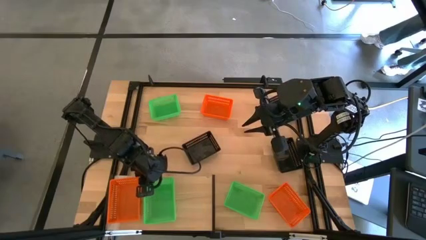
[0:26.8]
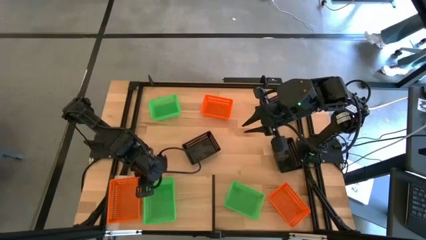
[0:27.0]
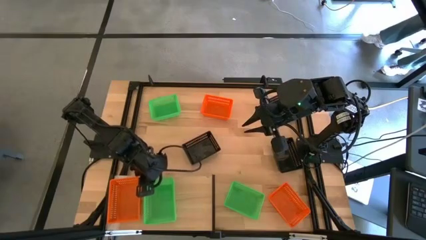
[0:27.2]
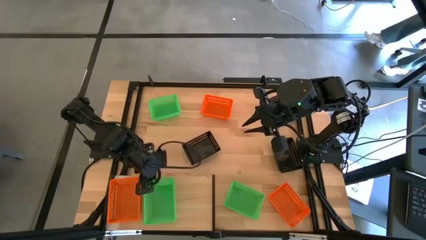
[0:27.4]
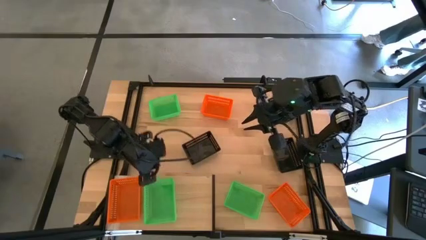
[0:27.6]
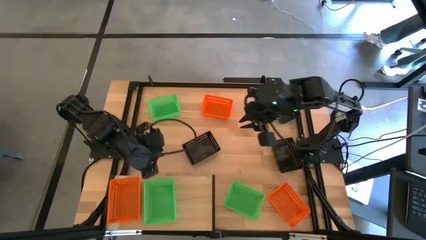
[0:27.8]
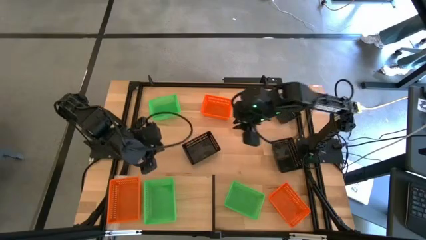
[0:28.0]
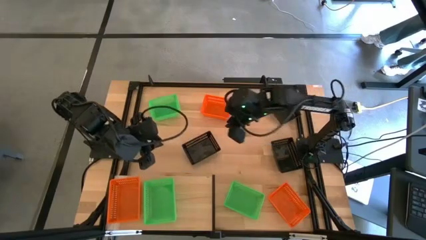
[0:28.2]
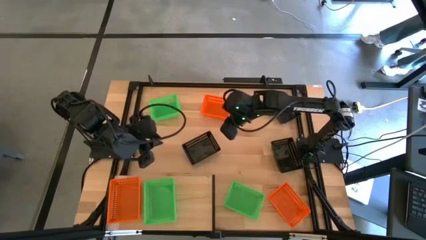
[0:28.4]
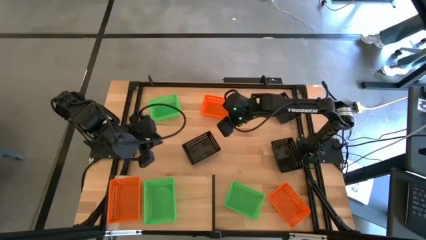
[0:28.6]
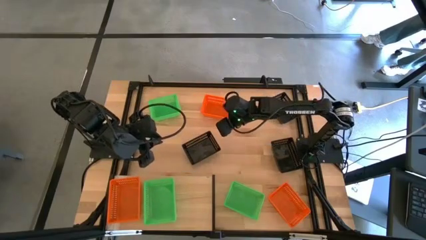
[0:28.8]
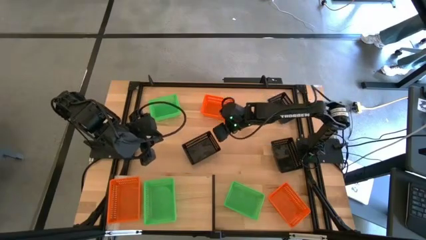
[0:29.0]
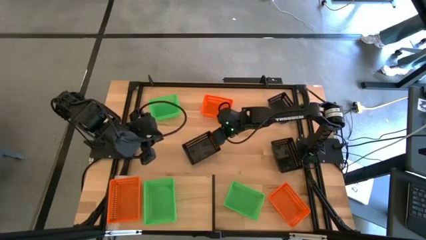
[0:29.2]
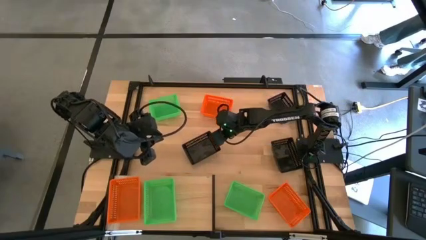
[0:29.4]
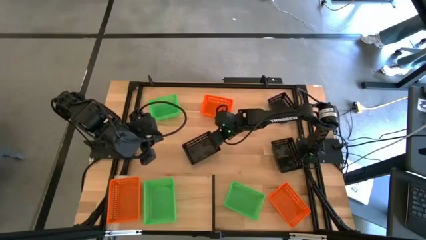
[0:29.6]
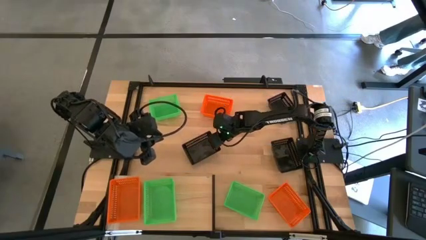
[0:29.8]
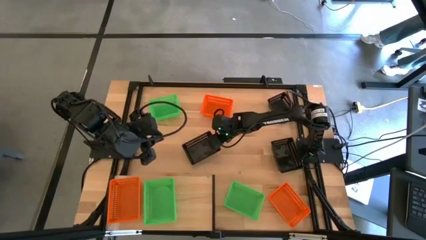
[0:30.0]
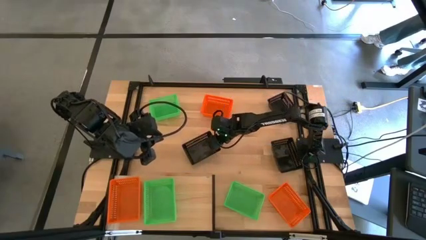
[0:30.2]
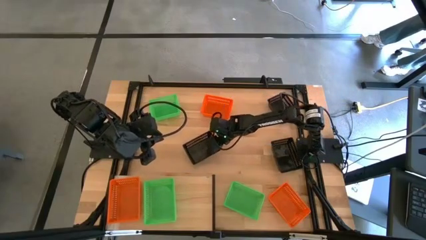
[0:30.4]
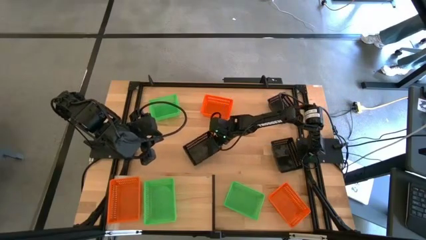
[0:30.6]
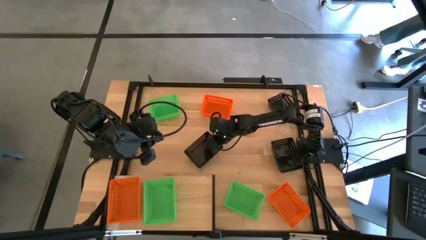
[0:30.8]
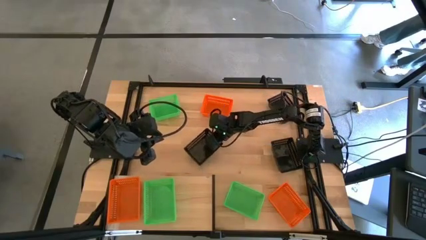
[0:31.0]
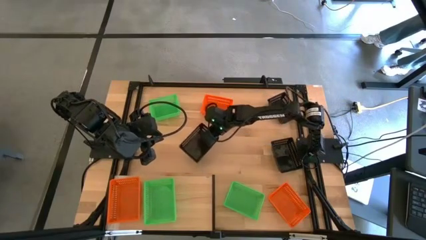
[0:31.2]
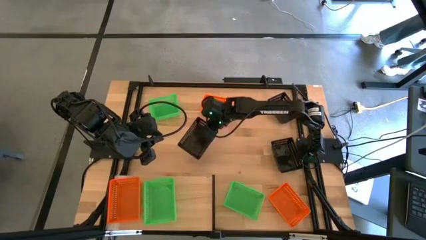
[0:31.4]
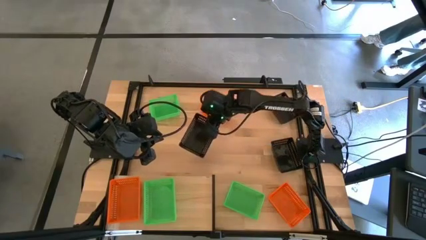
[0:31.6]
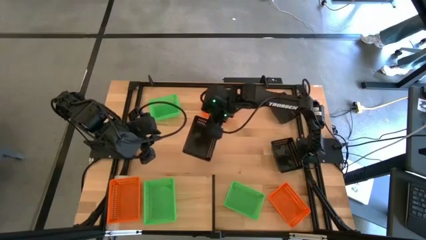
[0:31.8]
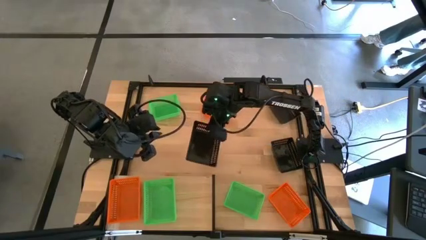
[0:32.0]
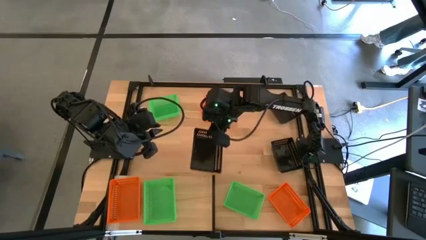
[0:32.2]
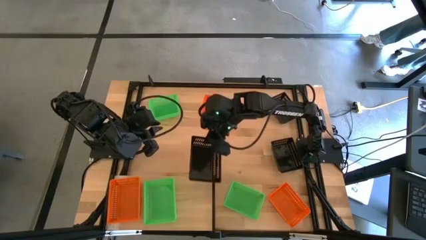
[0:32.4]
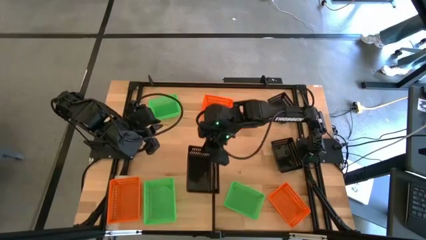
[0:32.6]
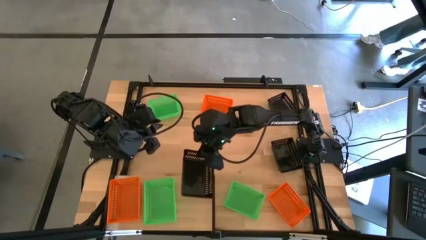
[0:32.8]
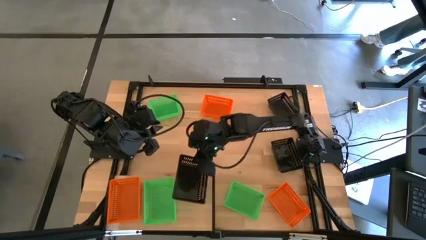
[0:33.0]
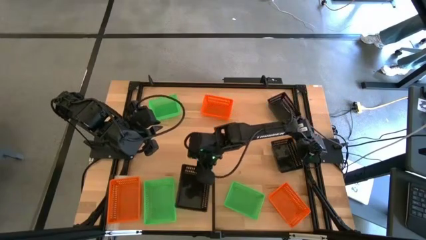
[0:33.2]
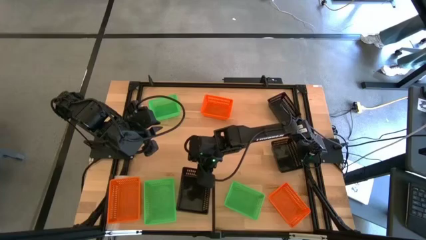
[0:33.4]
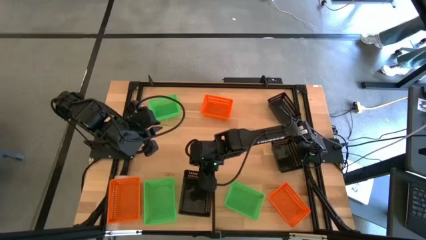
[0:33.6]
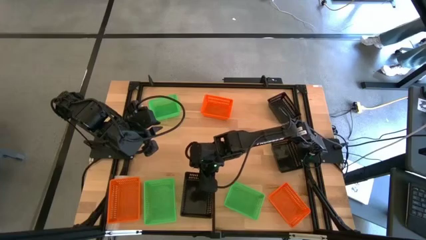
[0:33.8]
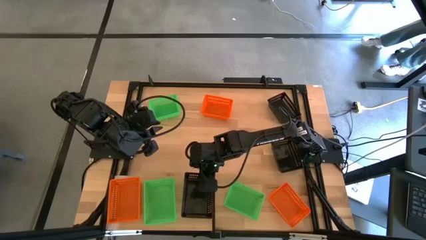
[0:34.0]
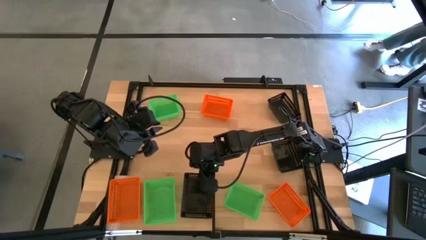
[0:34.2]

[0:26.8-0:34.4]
Task: Stack baskets on shelf by color
Put the left black basket on the shelf

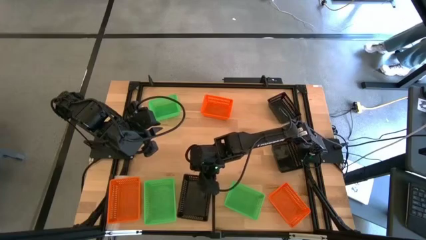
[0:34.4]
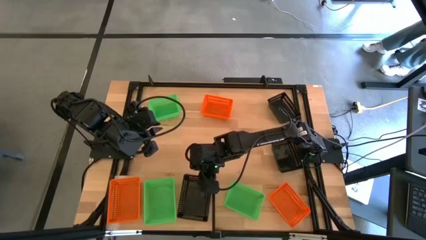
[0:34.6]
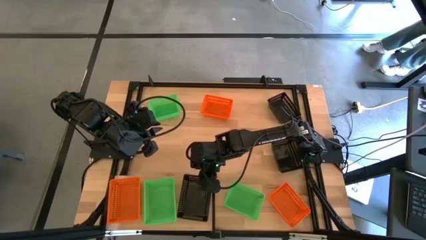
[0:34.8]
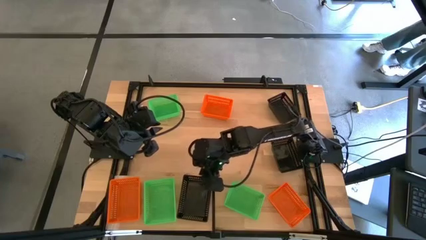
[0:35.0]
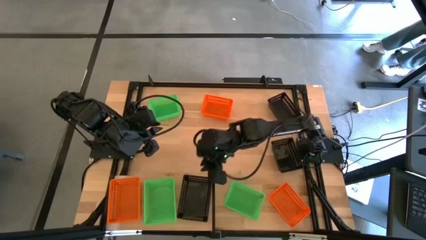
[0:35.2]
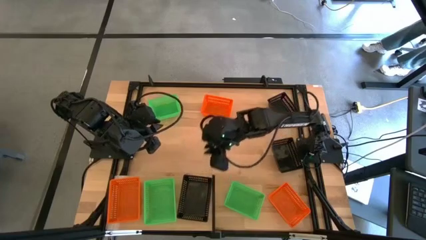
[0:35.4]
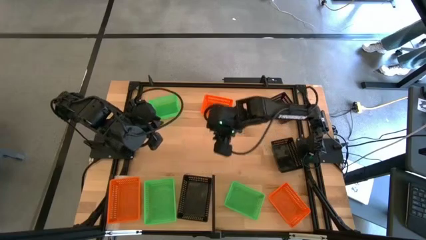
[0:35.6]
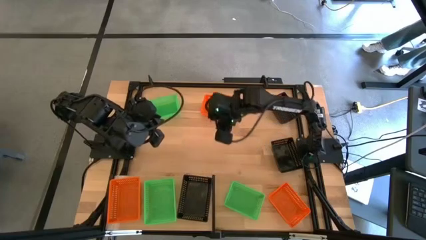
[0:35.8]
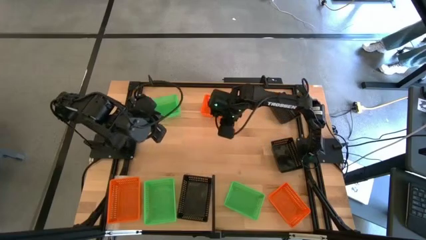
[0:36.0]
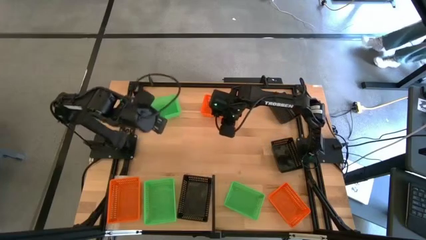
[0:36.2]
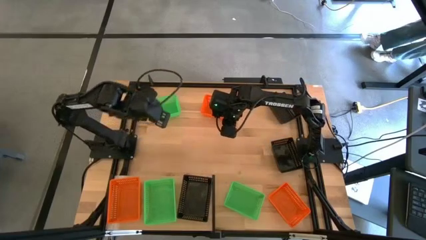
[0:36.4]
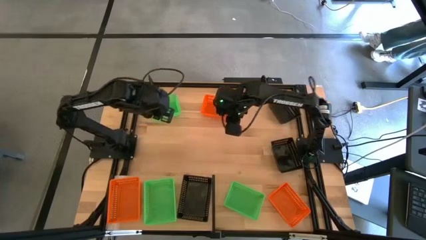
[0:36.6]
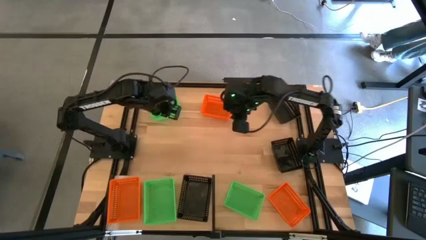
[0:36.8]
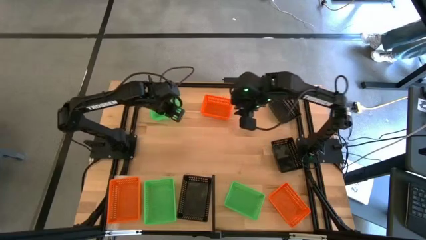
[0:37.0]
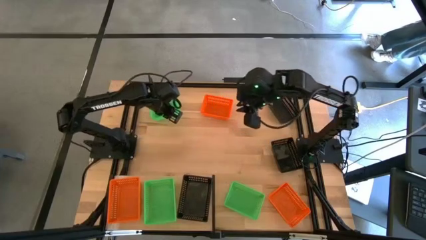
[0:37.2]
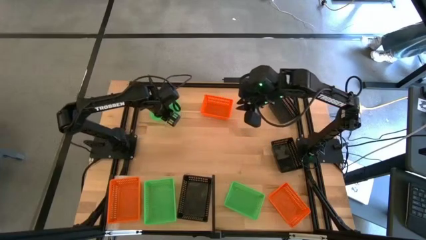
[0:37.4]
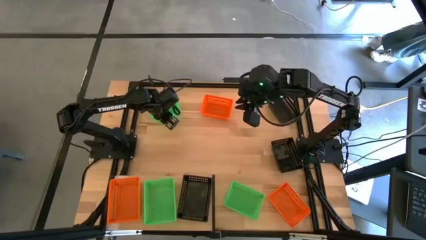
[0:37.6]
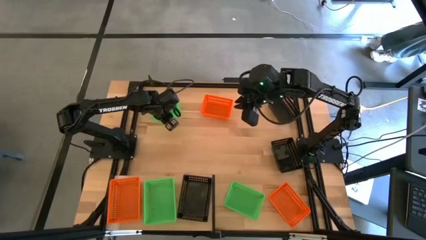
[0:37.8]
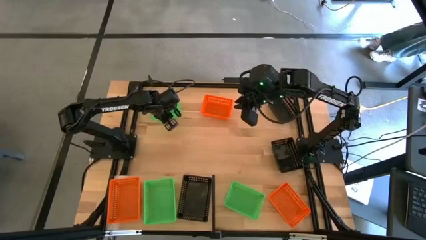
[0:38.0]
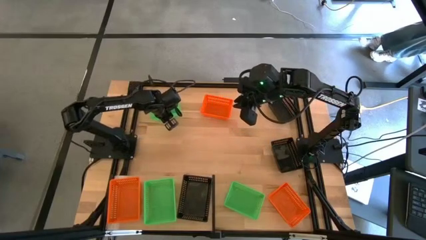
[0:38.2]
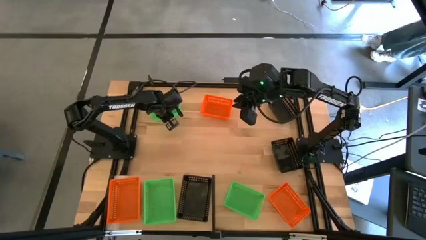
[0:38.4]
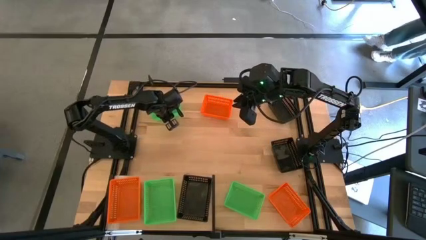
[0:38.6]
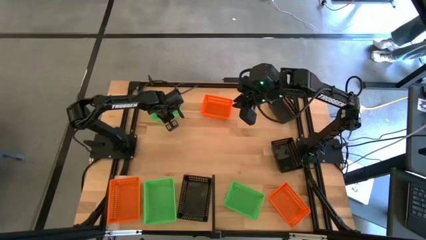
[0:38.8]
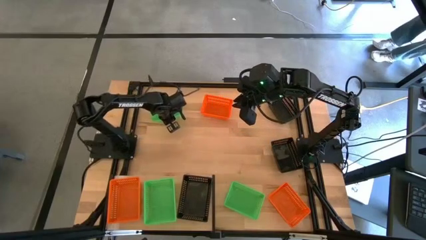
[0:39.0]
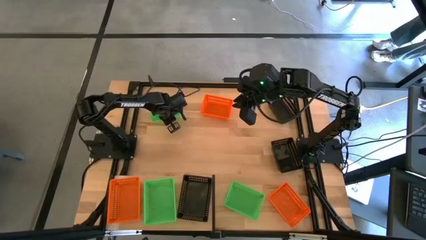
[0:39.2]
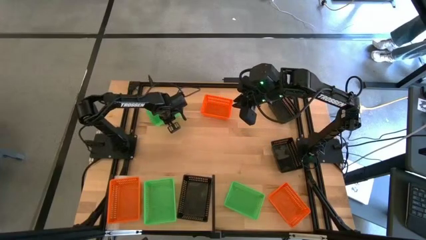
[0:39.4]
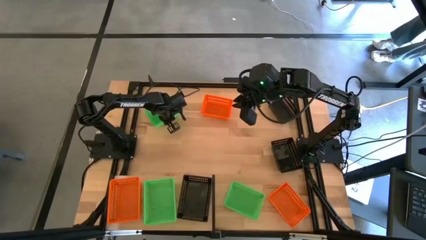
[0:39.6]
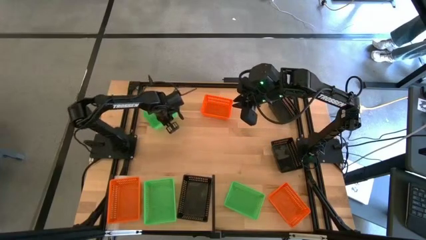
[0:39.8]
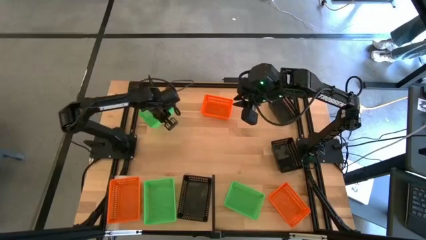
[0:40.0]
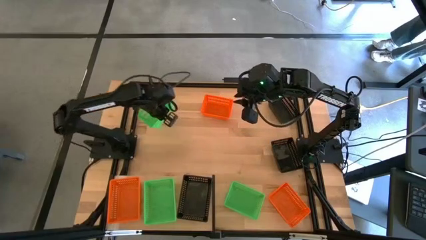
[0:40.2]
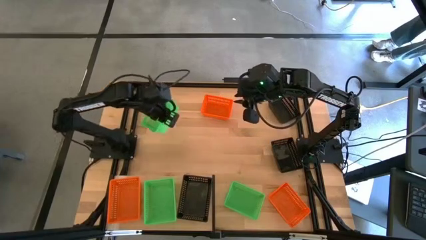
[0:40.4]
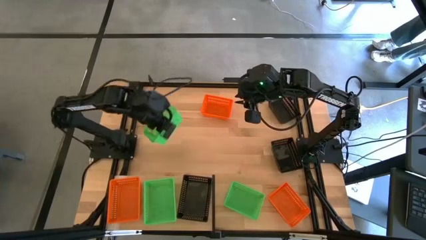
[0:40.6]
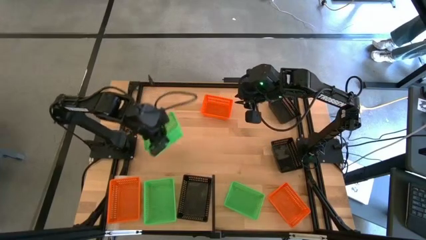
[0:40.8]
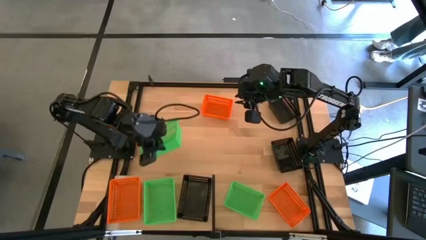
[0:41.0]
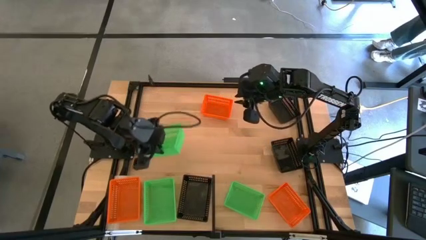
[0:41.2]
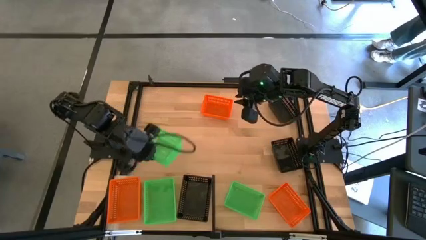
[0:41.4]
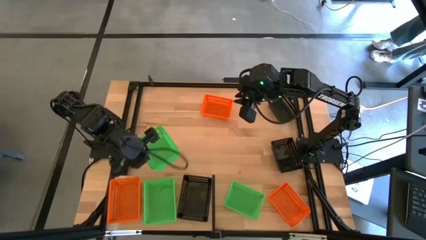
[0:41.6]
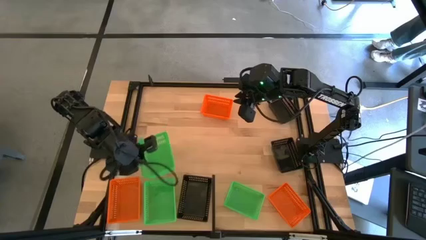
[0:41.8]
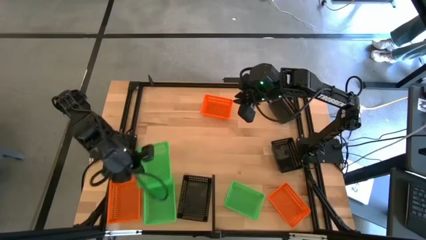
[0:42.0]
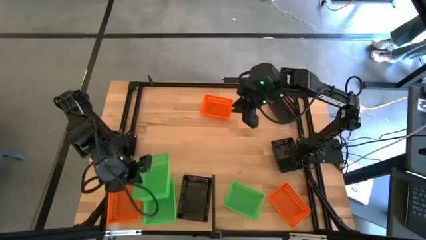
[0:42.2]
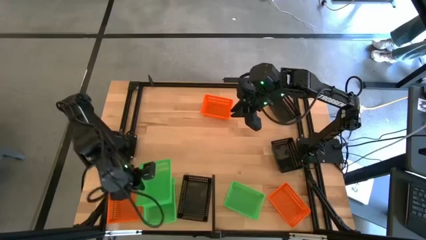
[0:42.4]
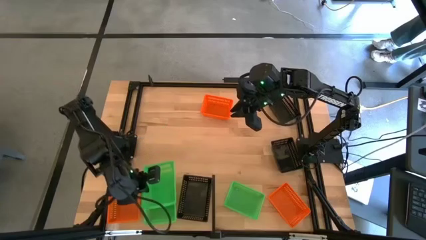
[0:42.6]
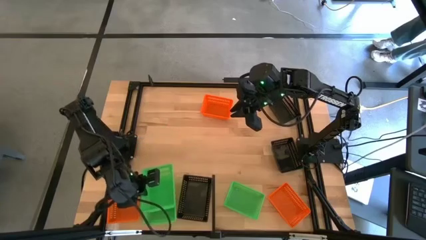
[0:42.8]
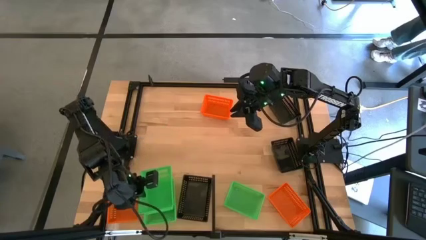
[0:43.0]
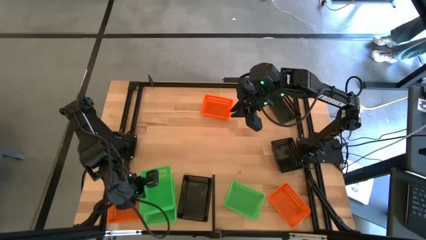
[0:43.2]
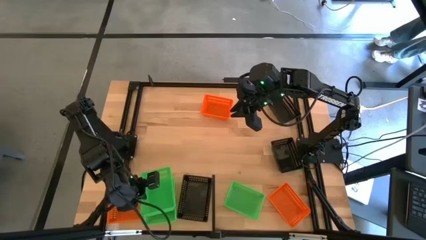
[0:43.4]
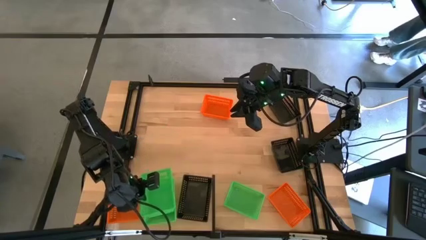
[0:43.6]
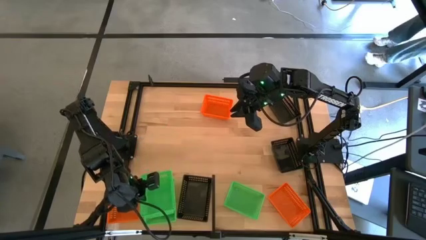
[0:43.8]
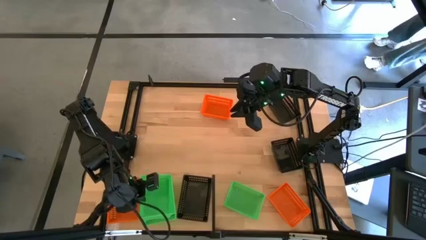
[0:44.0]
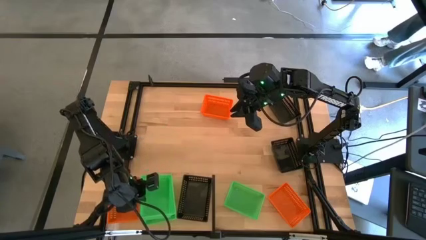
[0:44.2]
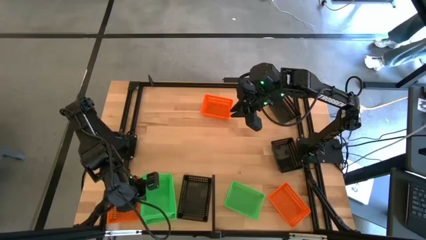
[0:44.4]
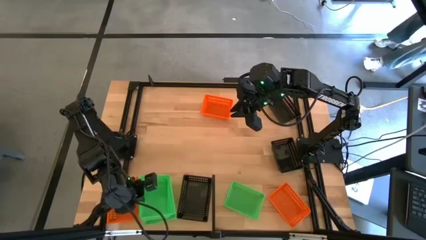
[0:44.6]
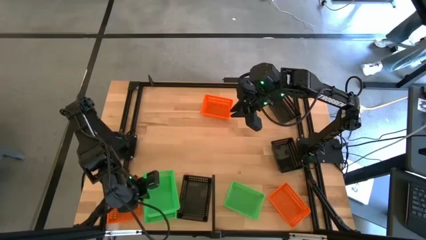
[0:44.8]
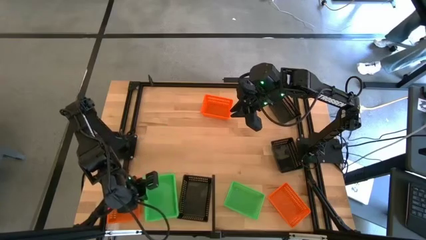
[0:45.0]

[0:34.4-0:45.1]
Stack the top green basket on top of the other green basket on the shelf
